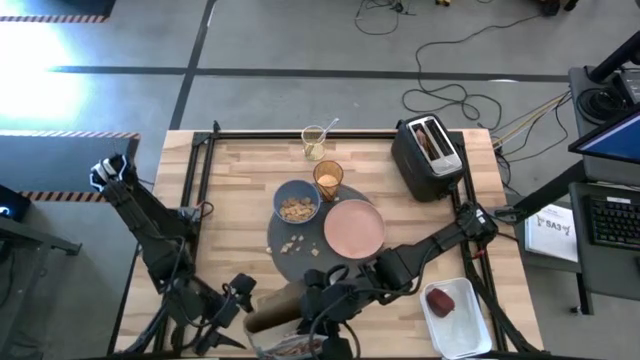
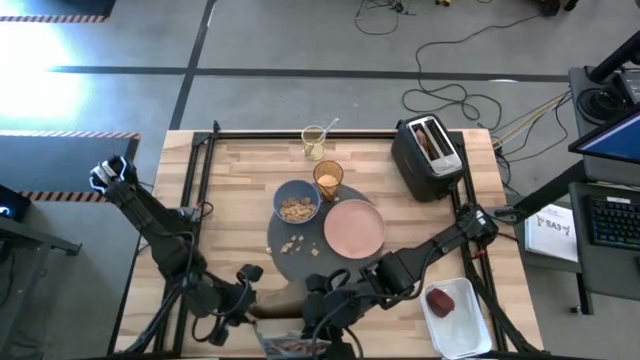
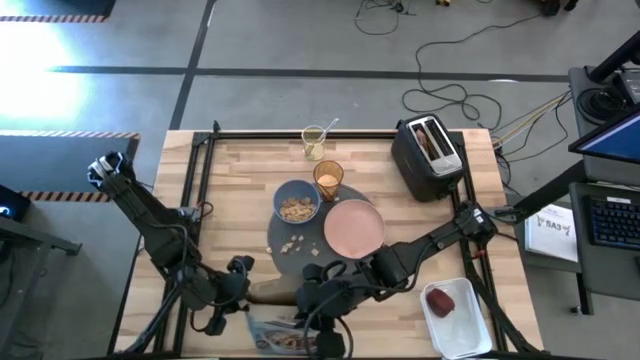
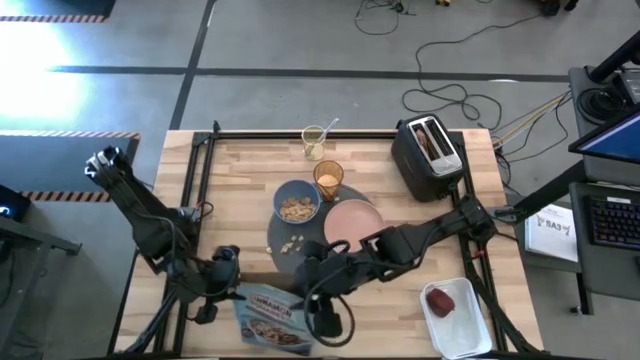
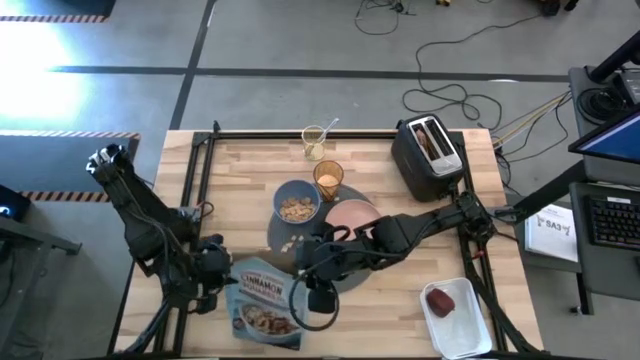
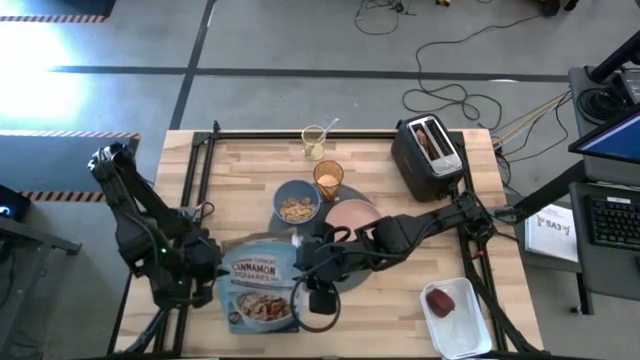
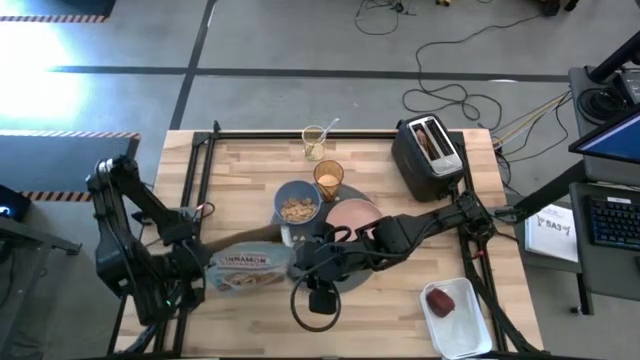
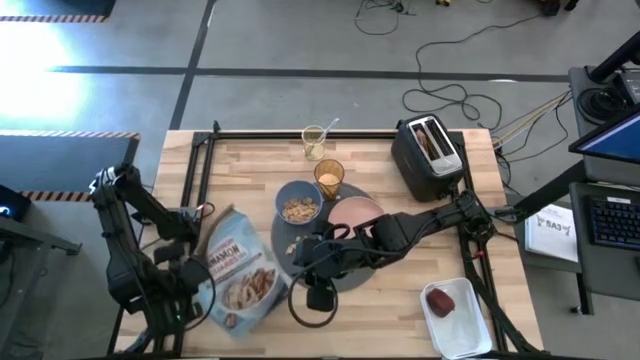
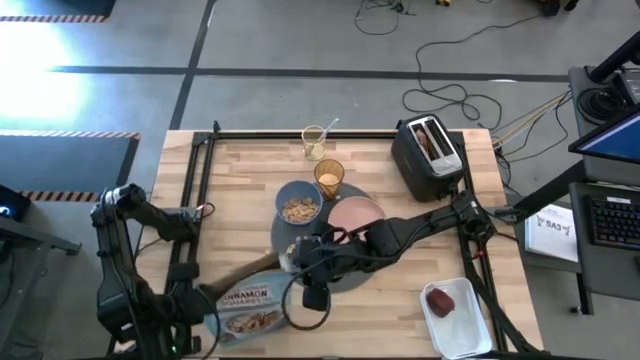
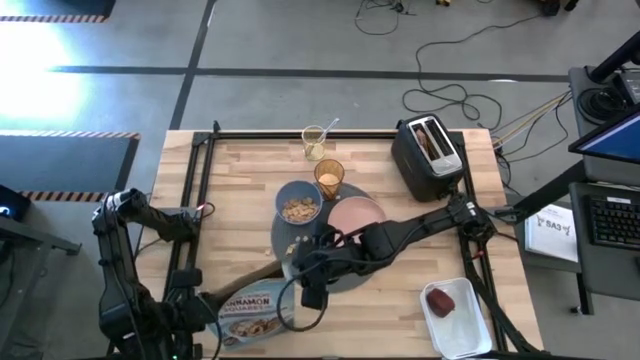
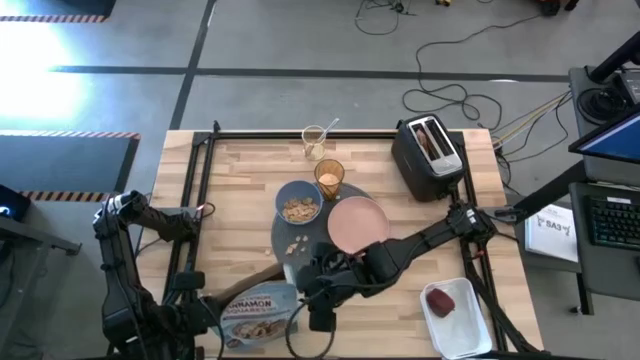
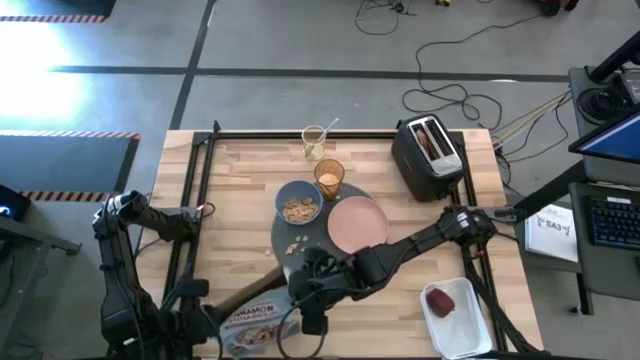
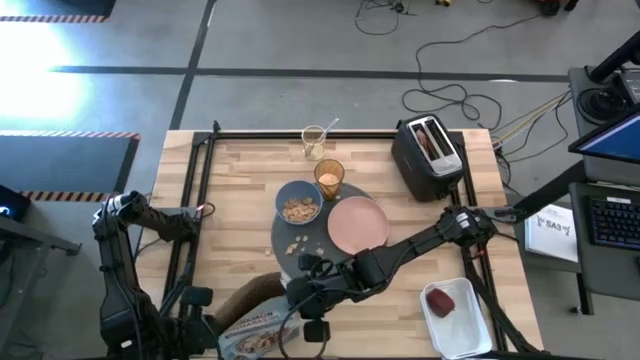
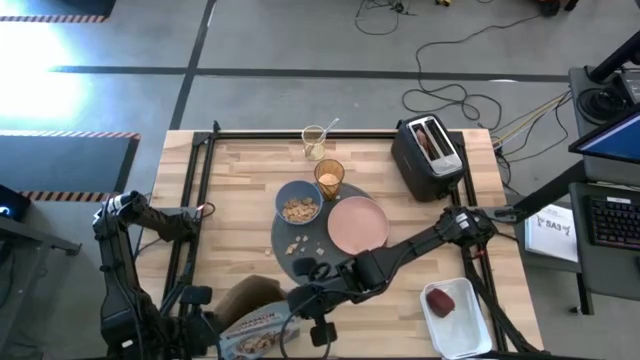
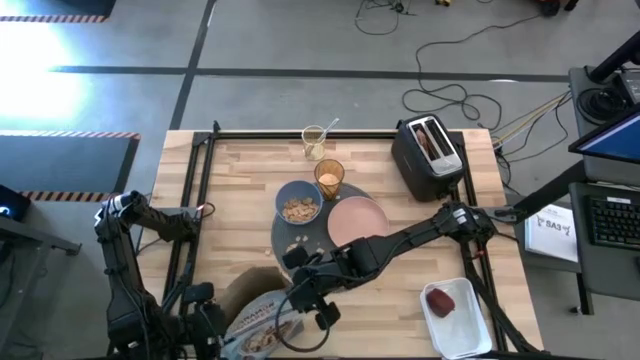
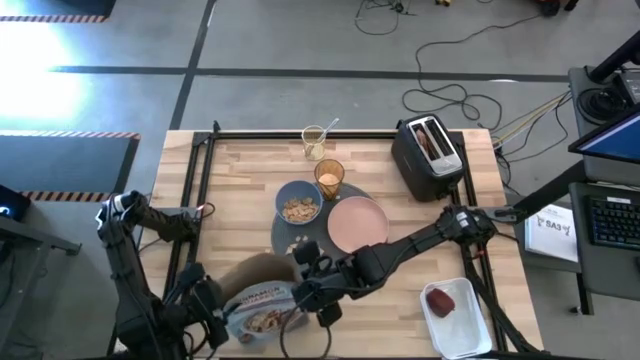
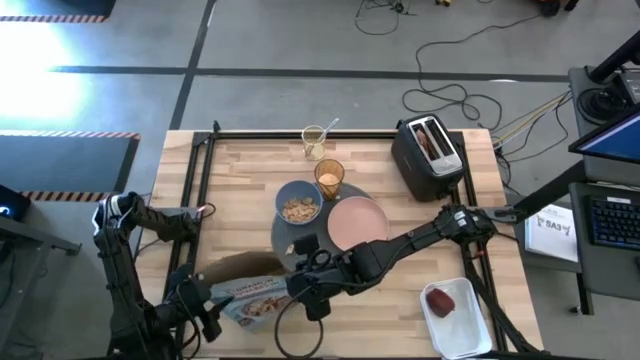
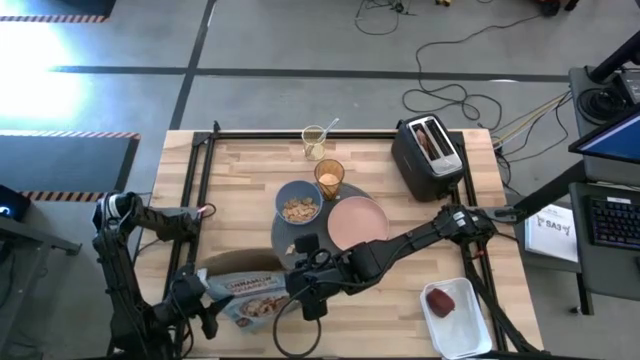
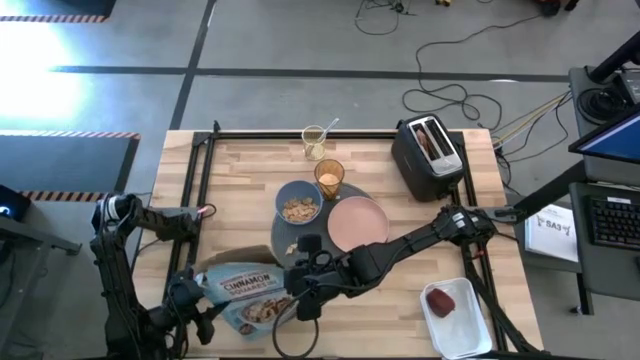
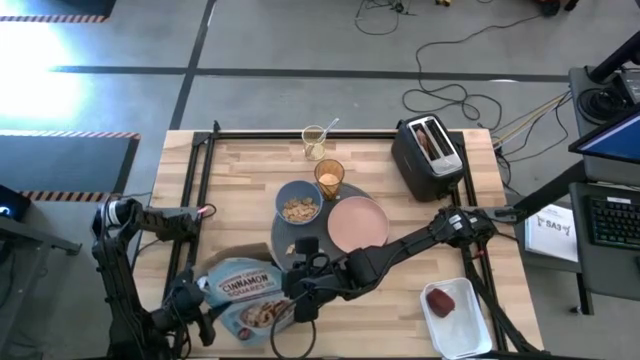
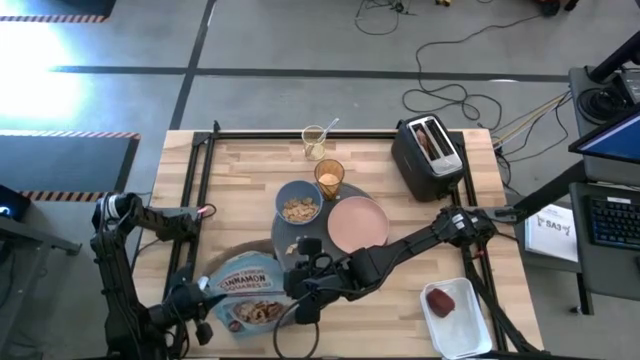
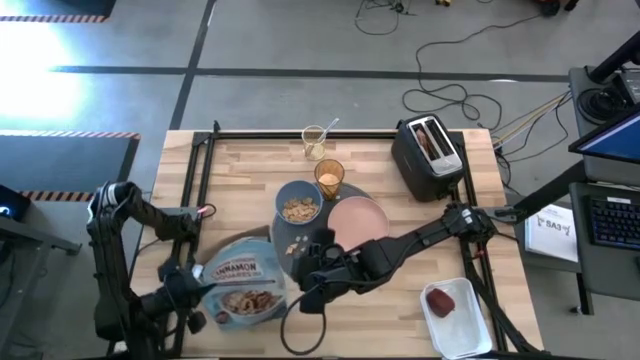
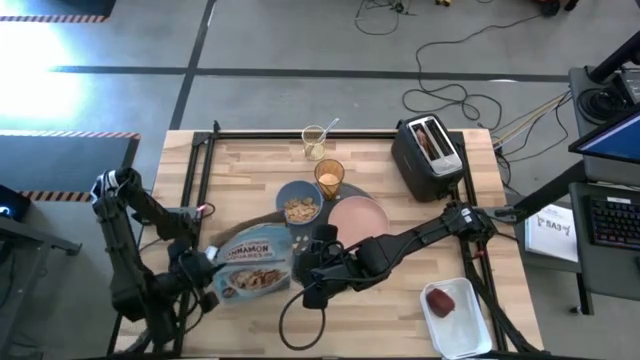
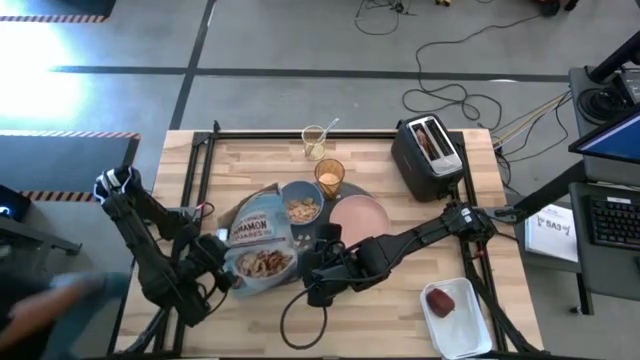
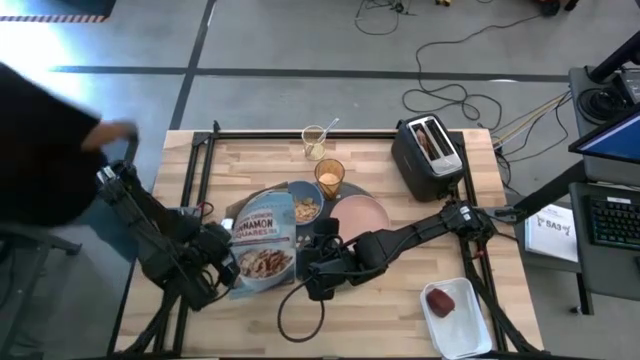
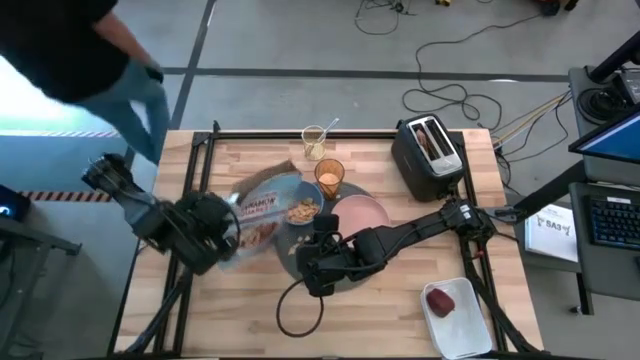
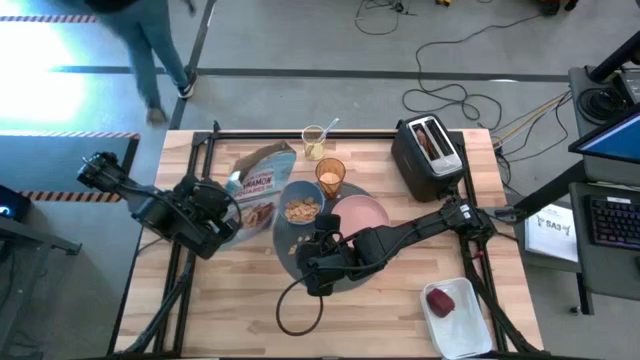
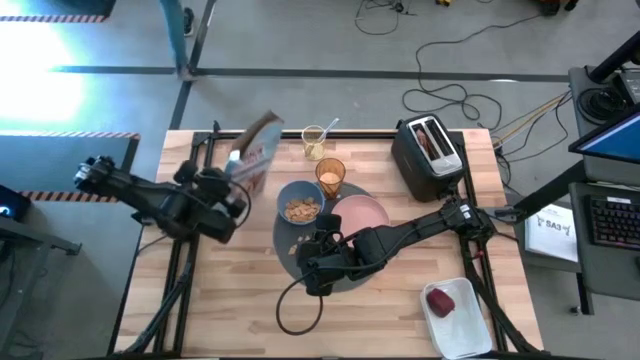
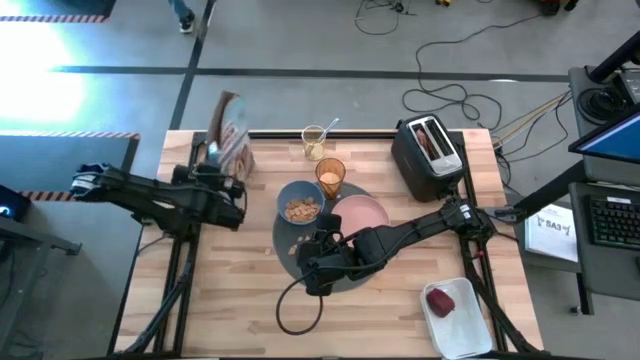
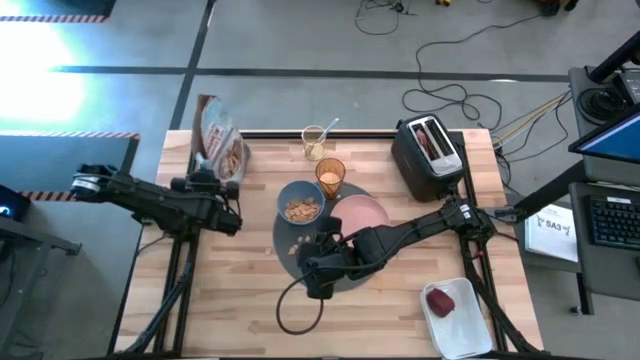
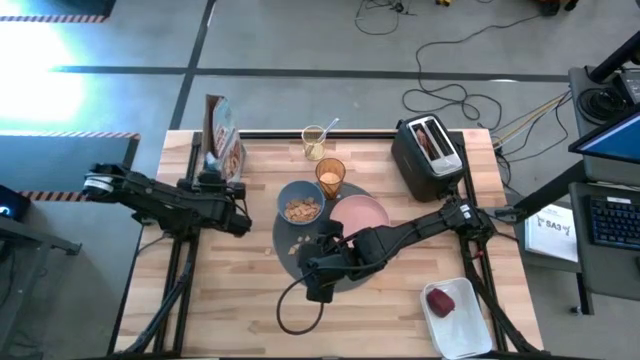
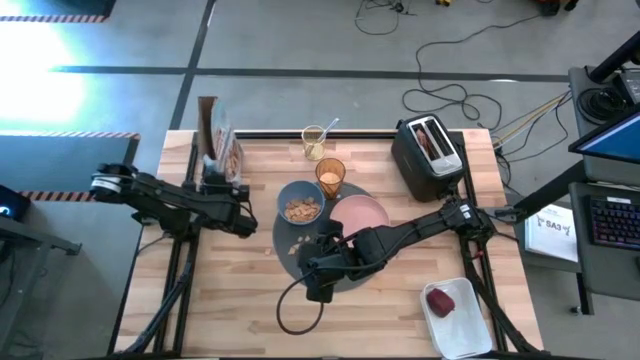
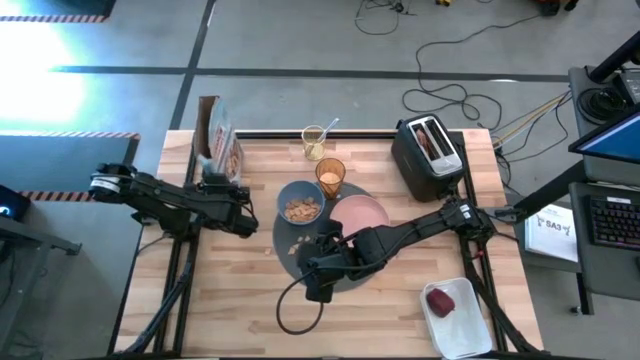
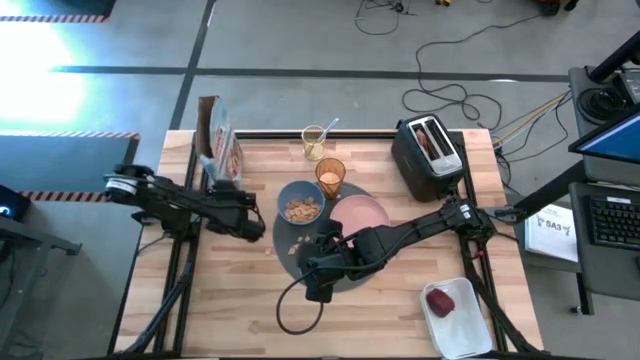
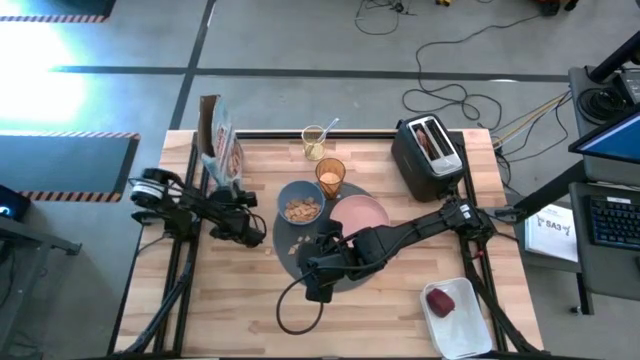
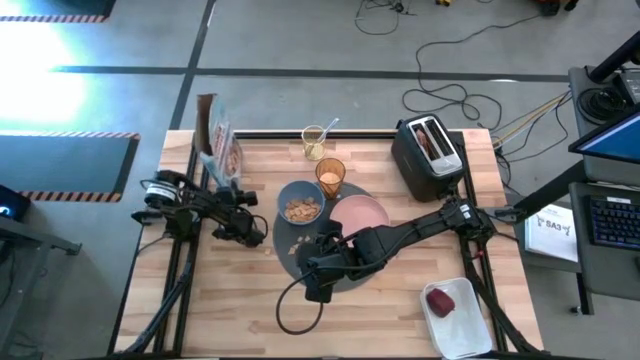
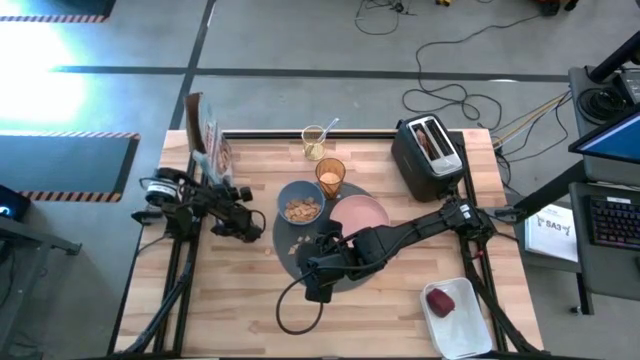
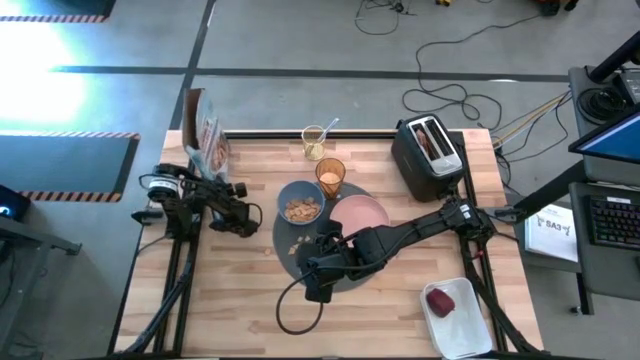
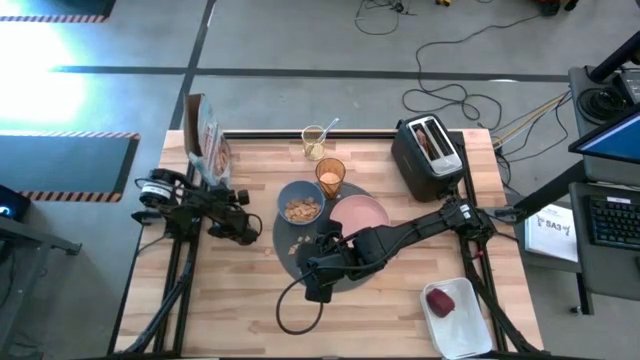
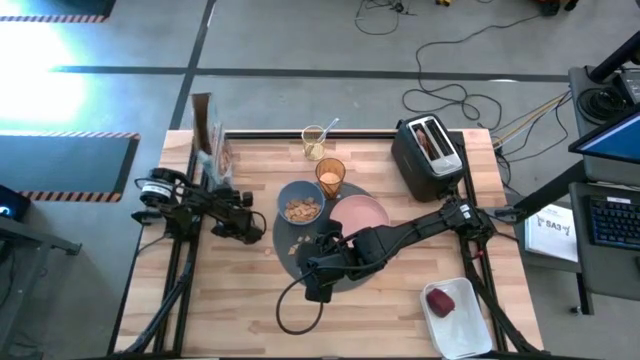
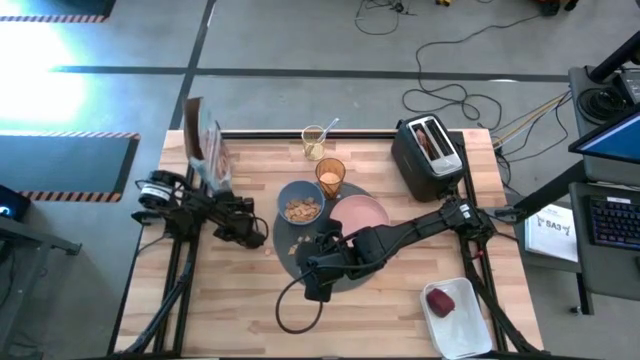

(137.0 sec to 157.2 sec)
Task: Arrange a breakfast setting
Pour the cereal from the cereal box into the blue bowl
